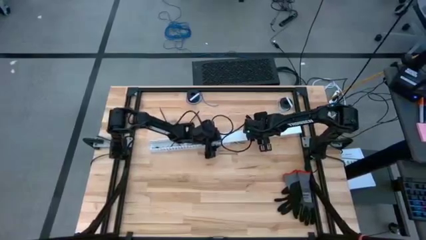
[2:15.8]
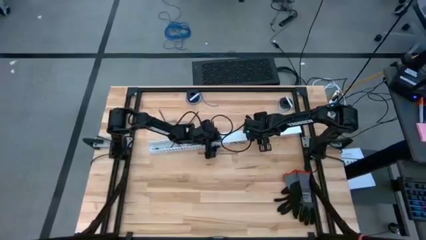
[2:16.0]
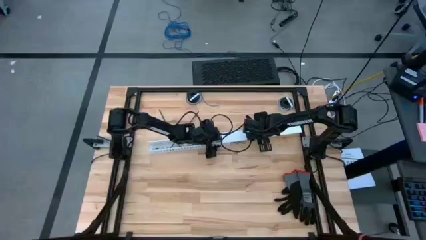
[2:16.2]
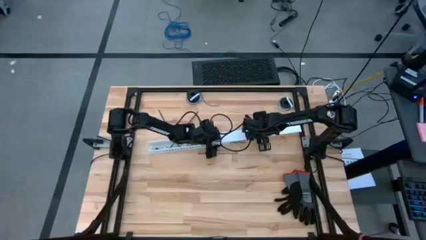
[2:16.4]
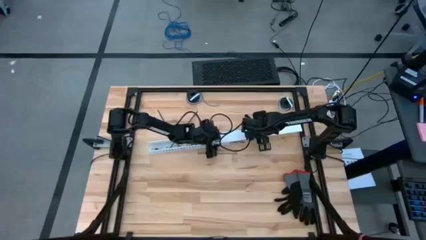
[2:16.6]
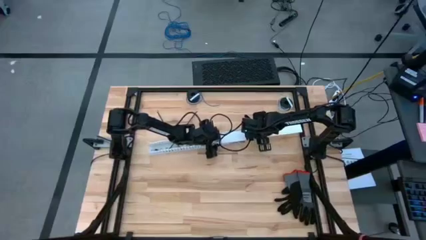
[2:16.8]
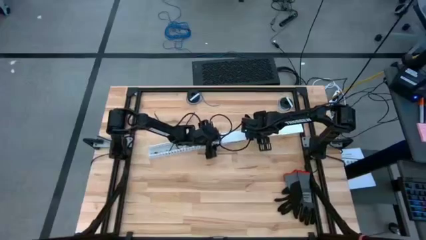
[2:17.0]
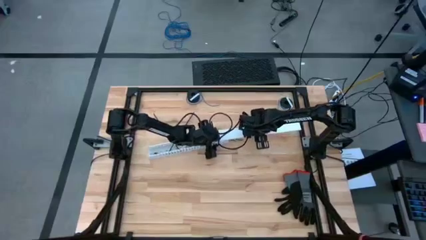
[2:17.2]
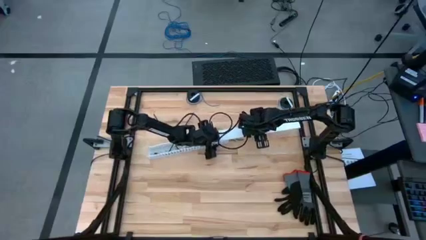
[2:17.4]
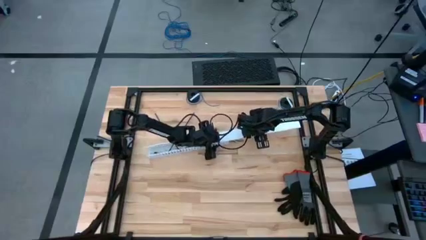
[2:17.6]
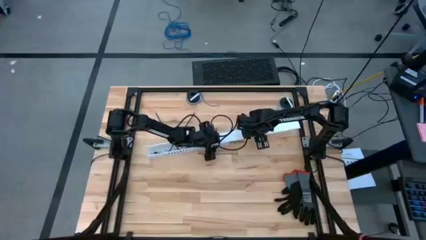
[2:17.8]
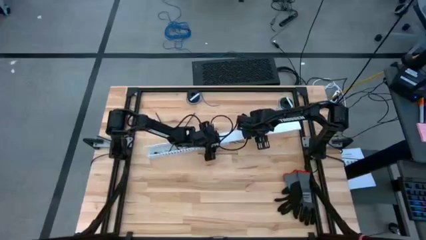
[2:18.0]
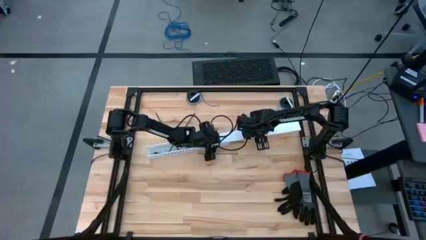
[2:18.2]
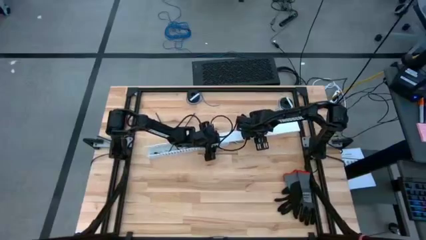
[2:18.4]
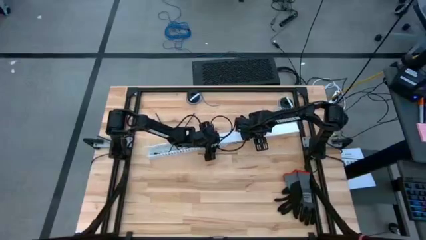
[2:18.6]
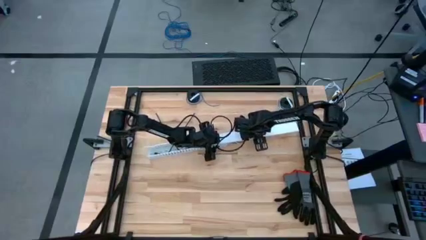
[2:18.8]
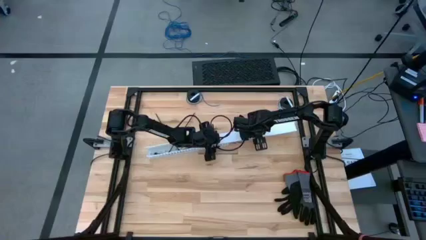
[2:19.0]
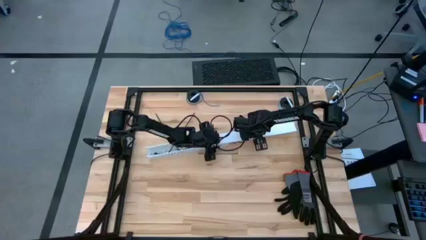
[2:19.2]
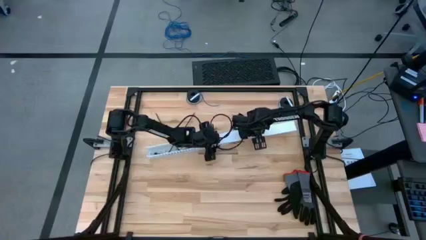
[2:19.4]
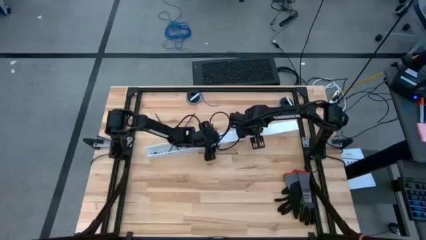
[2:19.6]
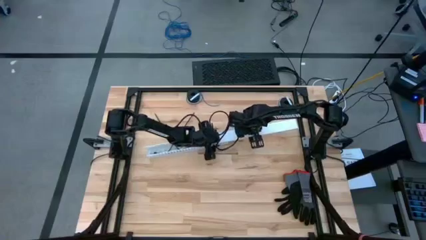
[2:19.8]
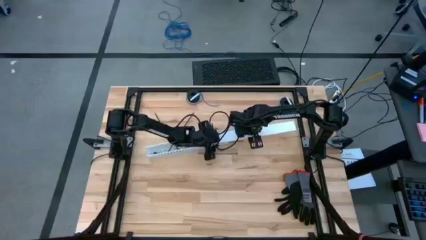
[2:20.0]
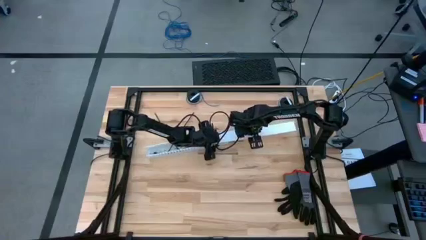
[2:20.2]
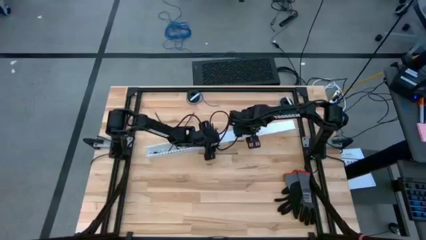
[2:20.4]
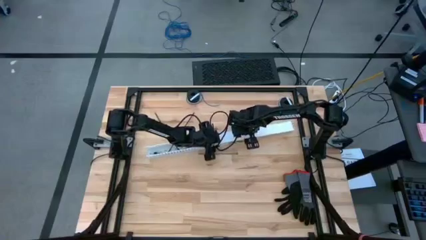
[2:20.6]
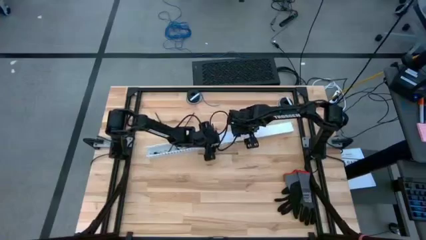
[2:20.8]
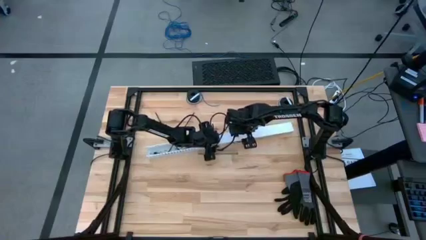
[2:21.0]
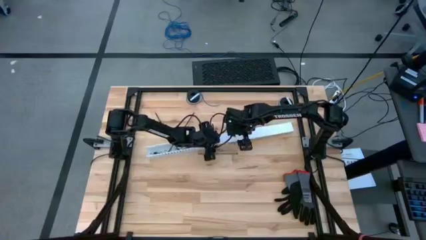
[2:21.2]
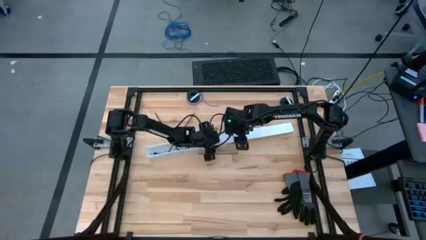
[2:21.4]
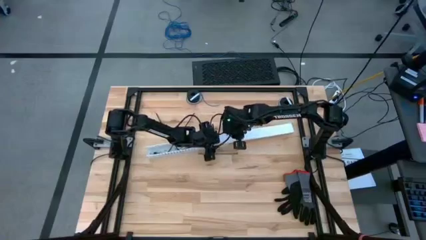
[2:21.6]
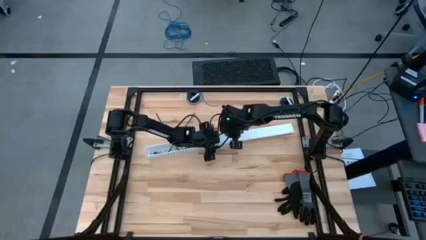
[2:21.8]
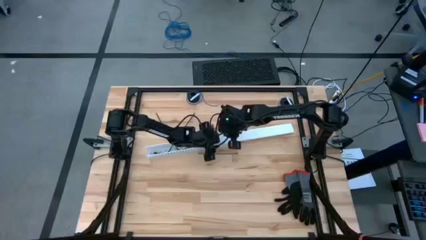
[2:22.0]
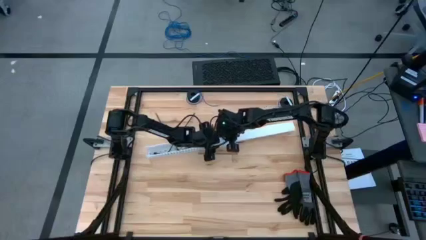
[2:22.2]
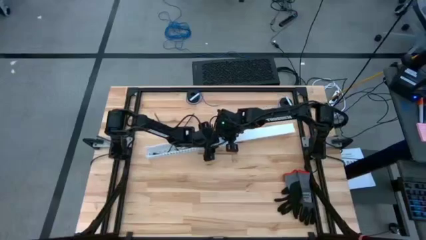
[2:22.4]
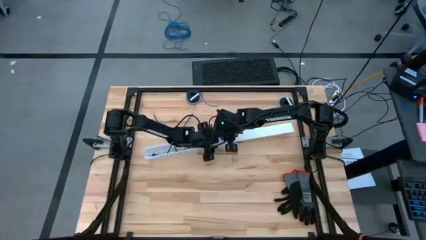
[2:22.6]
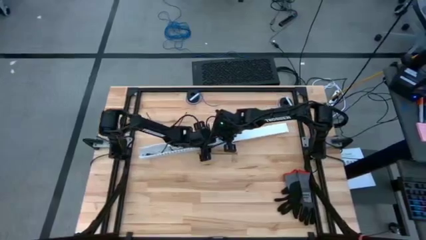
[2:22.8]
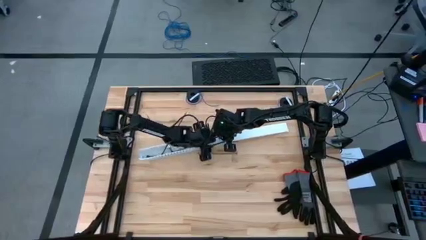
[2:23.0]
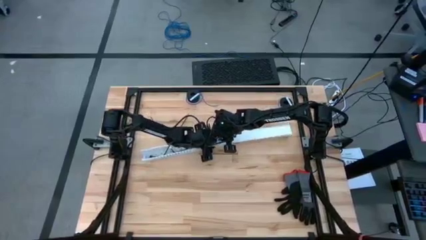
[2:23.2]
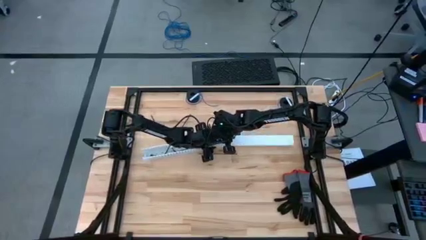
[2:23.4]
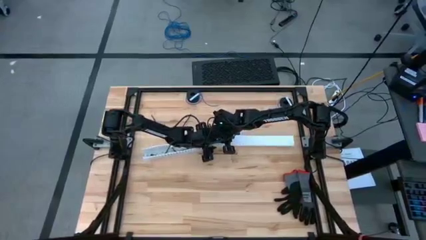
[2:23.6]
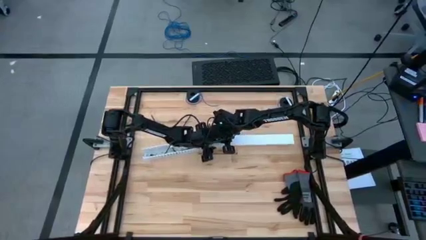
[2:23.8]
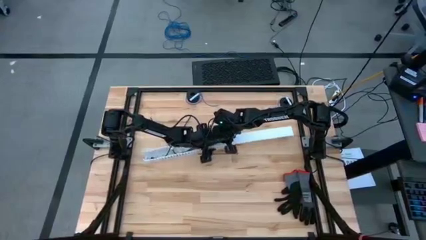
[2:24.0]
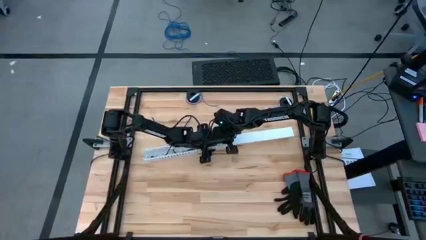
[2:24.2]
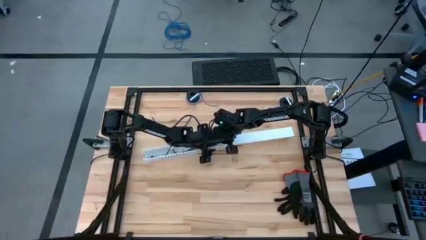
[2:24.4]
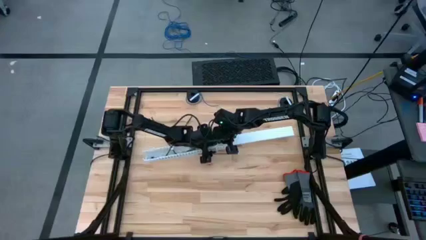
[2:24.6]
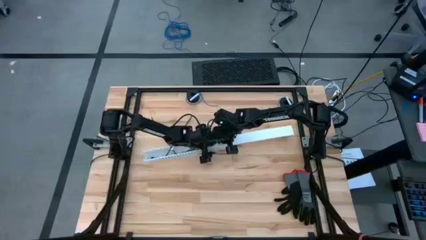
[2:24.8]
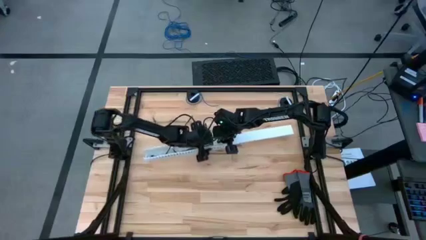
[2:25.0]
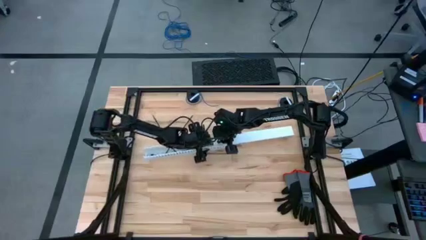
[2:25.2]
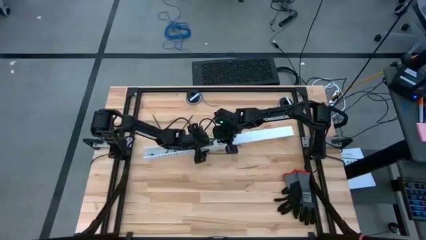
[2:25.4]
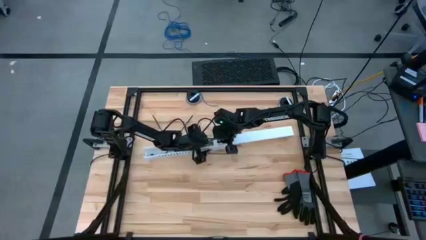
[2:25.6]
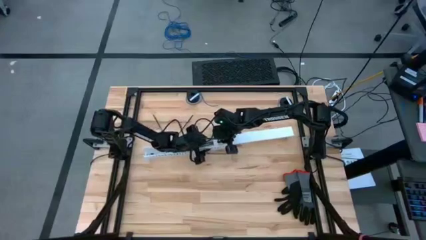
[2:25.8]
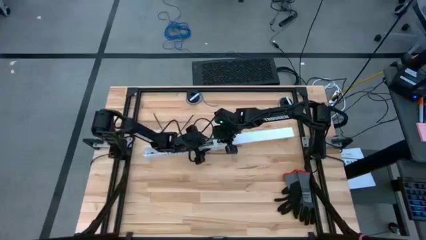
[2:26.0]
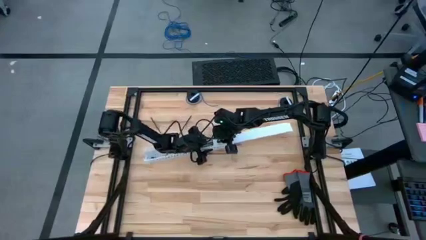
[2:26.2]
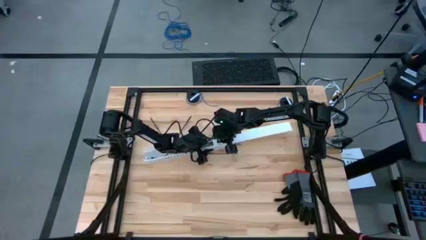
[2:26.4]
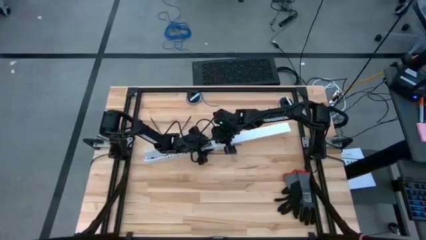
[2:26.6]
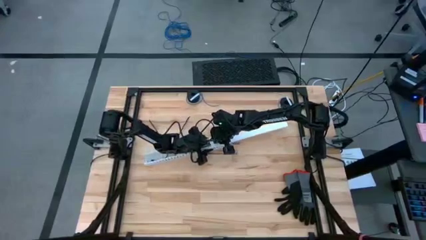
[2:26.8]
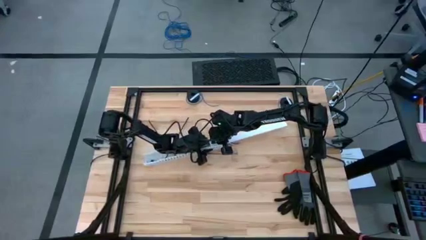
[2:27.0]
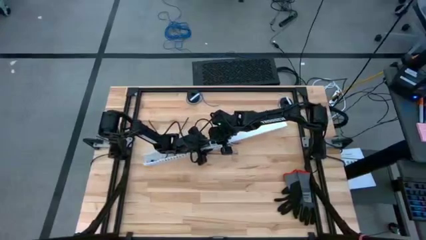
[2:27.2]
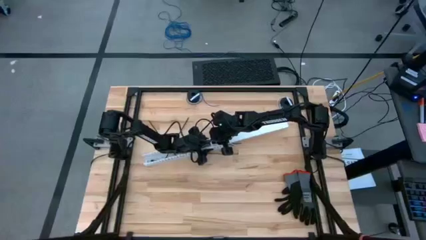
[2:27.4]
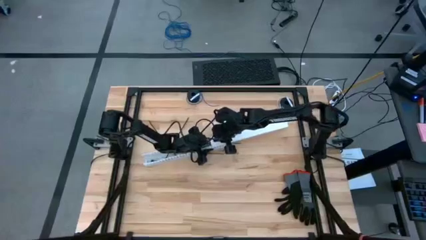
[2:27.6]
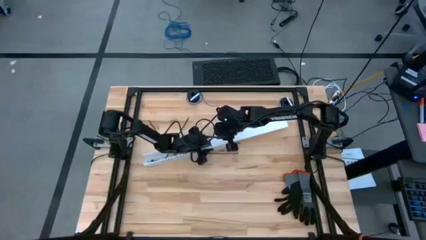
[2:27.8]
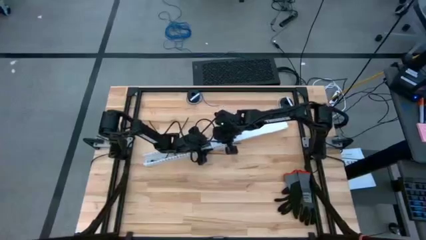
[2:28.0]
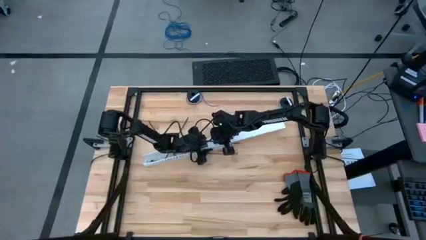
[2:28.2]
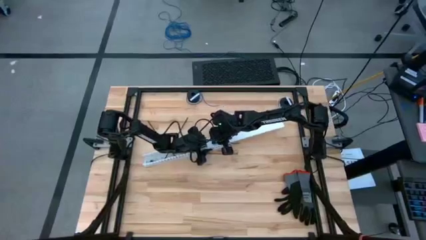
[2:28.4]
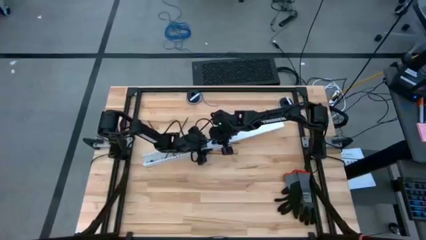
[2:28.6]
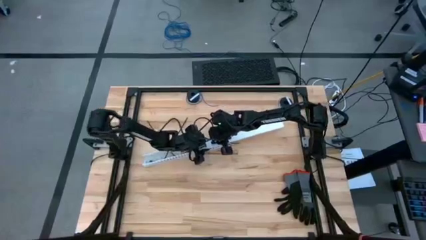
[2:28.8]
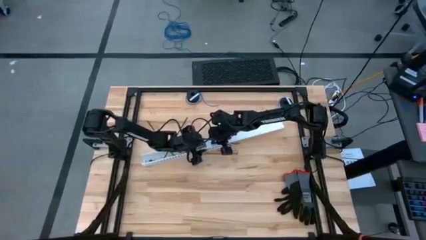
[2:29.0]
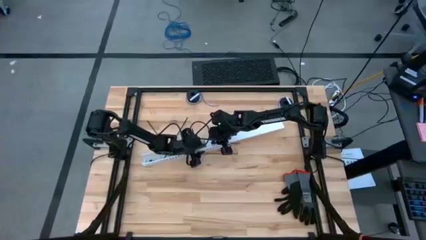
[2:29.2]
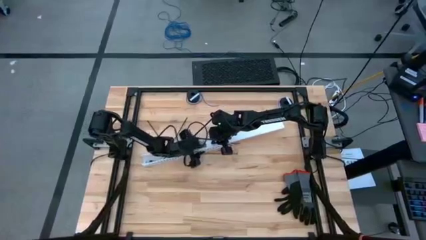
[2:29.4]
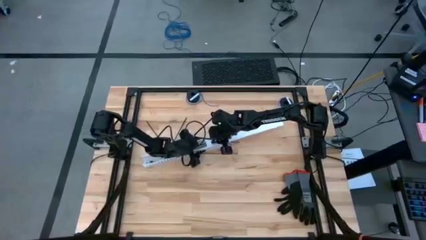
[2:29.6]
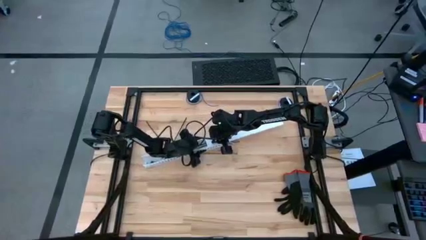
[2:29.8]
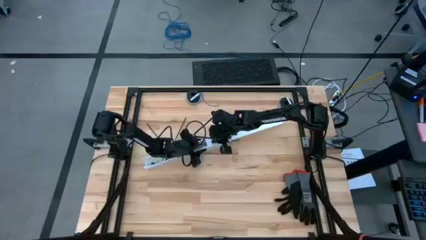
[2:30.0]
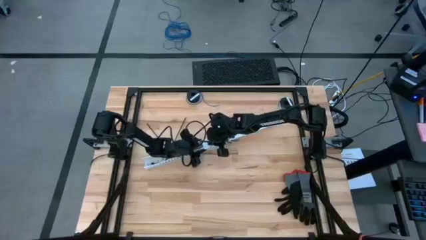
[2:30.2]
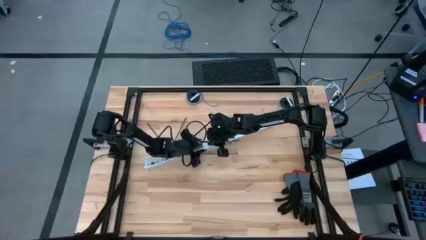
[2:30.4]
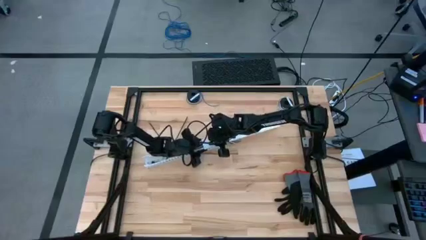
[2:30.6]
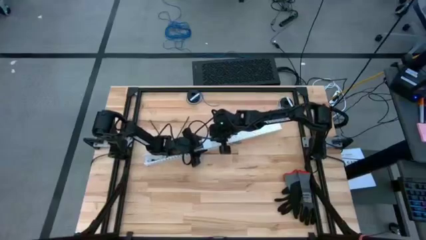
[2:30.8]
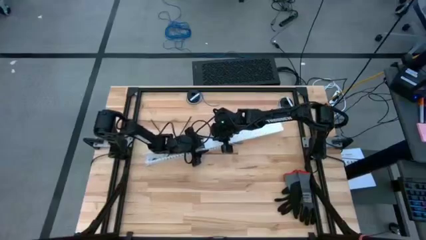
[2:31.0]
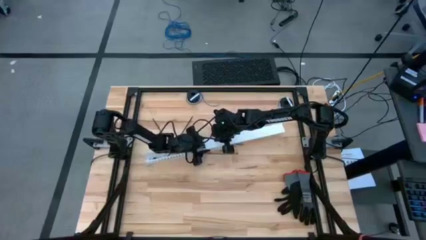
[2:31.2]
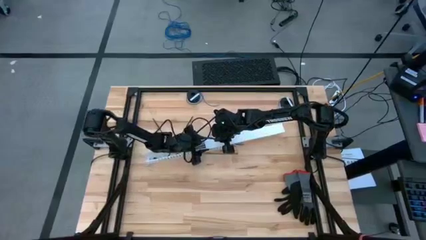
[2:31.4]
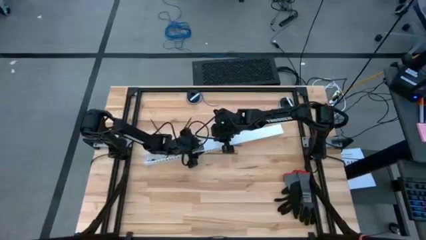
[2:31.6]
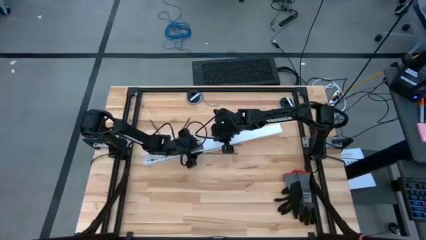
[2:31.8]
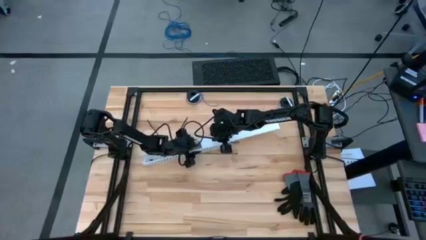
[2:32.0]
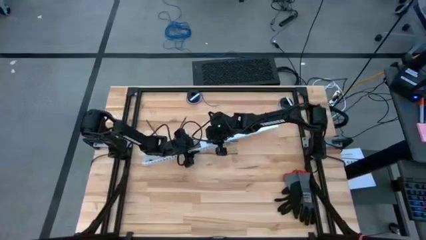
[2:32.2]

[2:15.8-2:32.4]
Task: Ziptie cables
Close the white cable duct tray the with white cable cover
